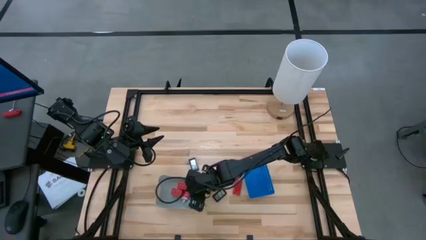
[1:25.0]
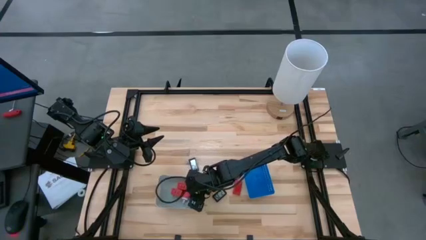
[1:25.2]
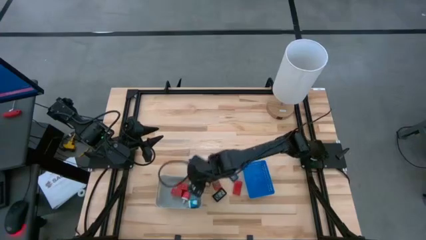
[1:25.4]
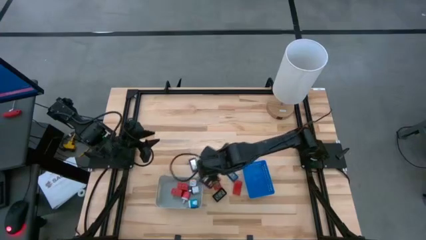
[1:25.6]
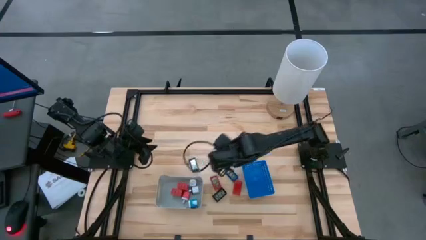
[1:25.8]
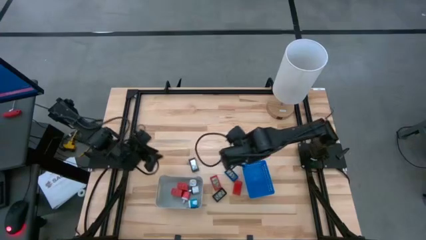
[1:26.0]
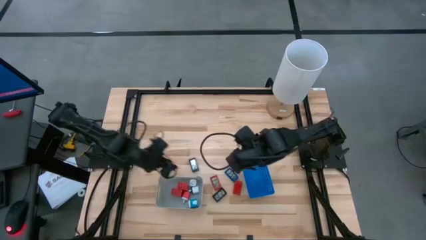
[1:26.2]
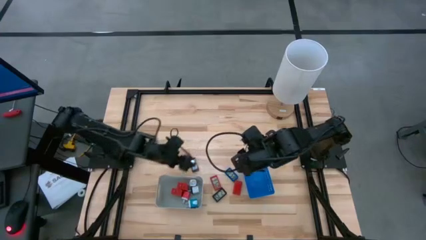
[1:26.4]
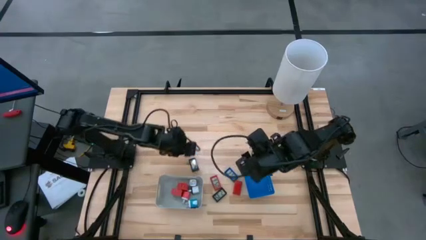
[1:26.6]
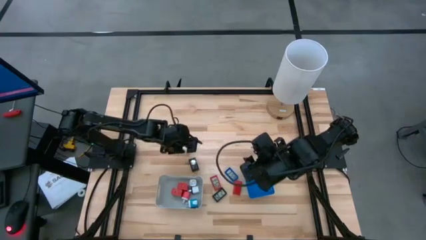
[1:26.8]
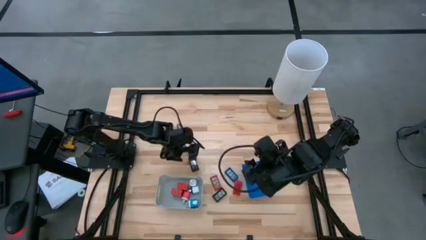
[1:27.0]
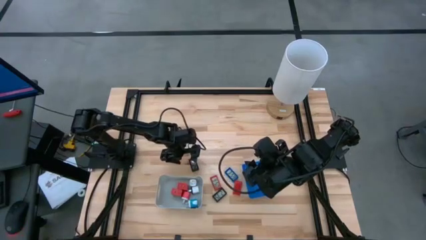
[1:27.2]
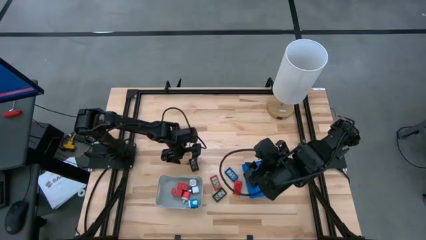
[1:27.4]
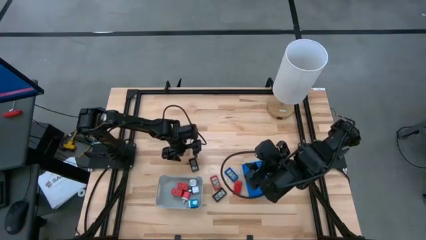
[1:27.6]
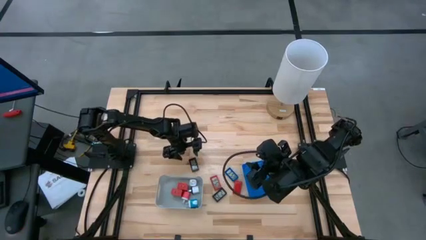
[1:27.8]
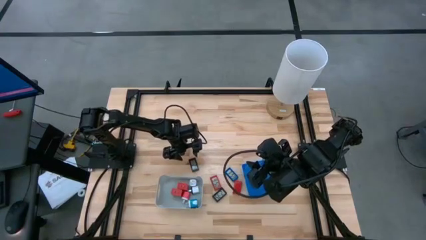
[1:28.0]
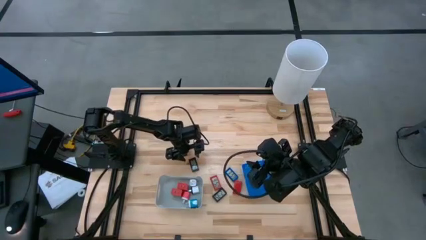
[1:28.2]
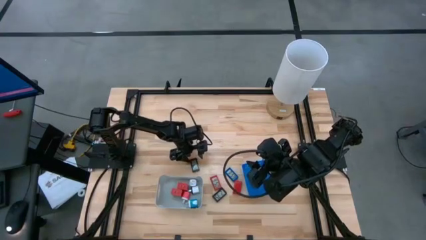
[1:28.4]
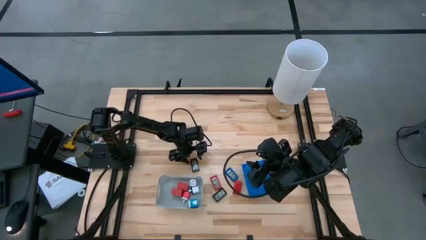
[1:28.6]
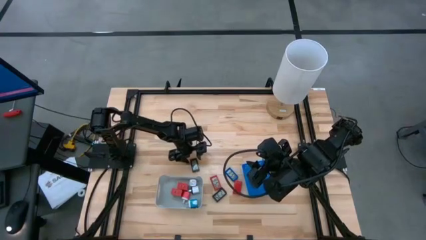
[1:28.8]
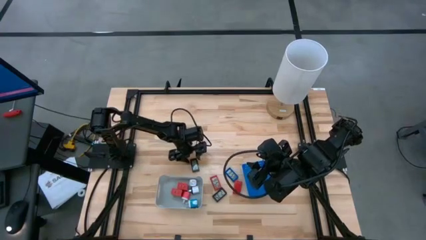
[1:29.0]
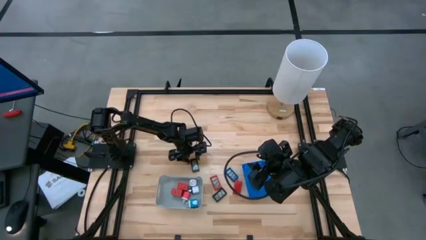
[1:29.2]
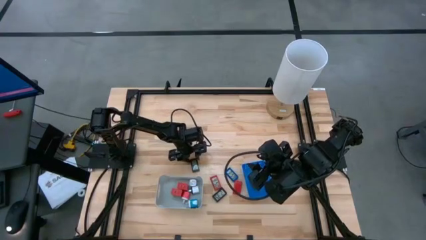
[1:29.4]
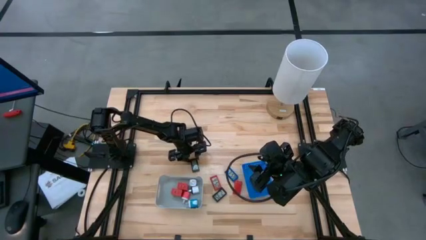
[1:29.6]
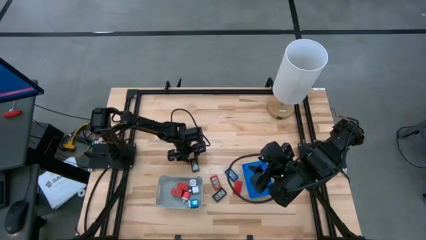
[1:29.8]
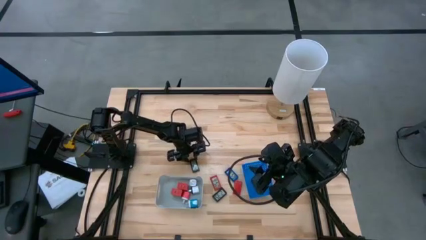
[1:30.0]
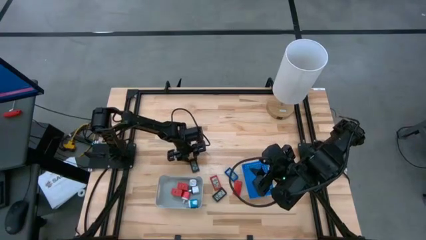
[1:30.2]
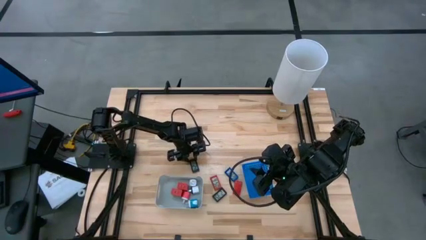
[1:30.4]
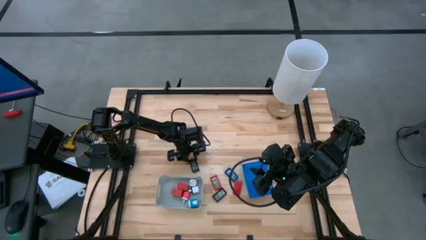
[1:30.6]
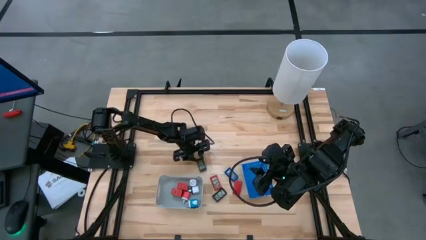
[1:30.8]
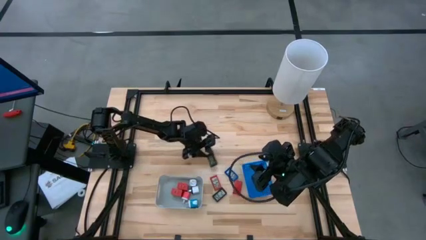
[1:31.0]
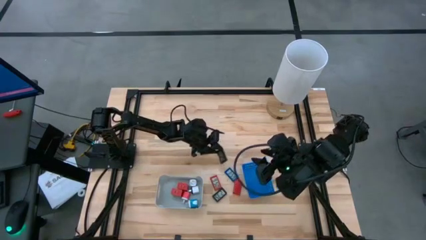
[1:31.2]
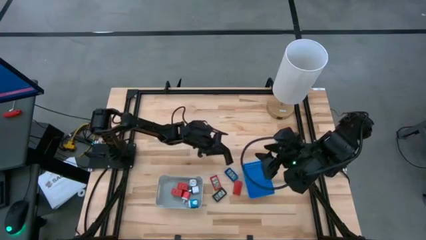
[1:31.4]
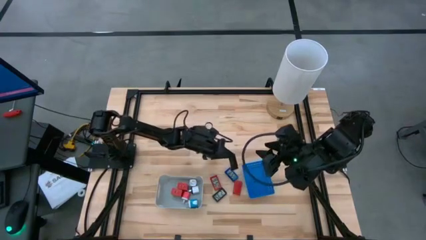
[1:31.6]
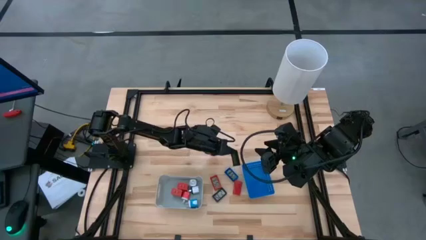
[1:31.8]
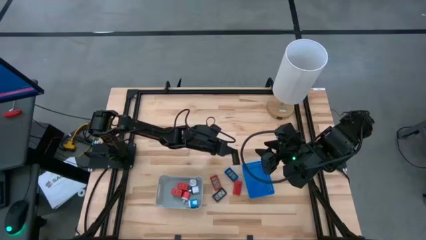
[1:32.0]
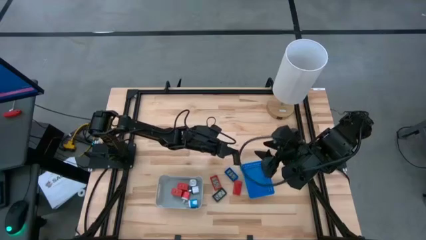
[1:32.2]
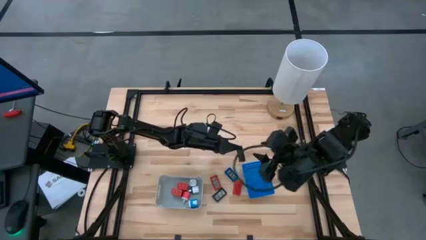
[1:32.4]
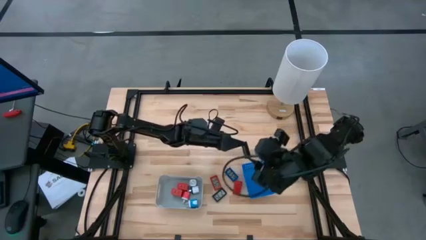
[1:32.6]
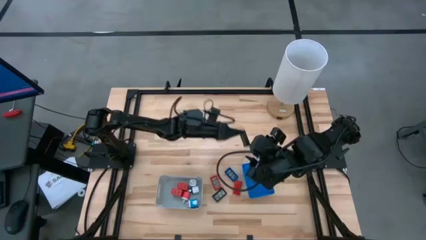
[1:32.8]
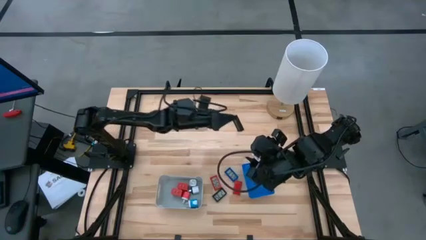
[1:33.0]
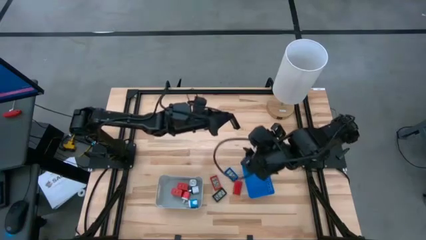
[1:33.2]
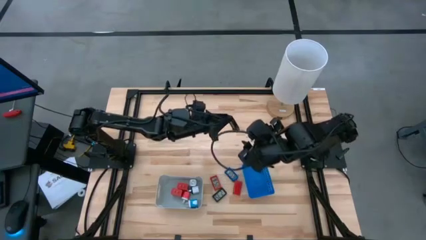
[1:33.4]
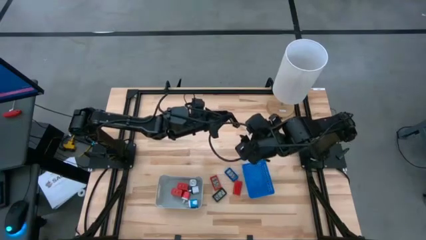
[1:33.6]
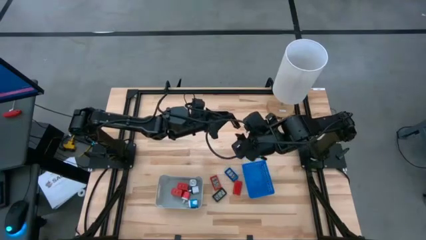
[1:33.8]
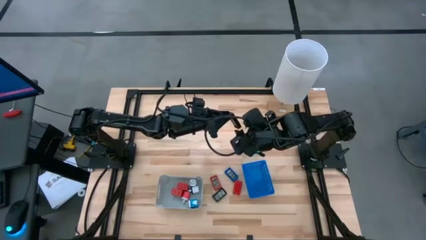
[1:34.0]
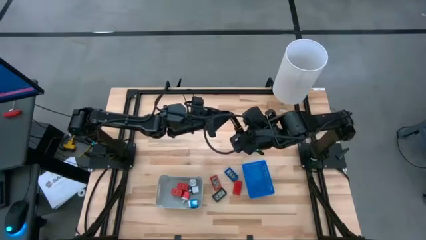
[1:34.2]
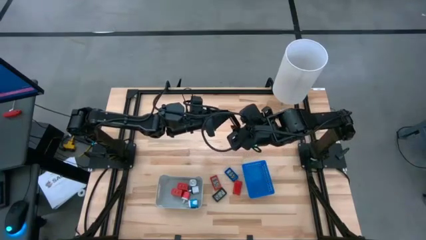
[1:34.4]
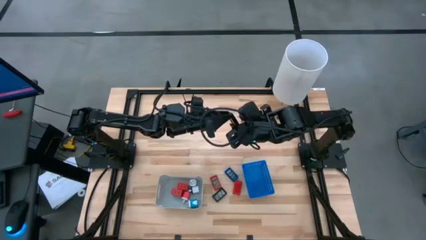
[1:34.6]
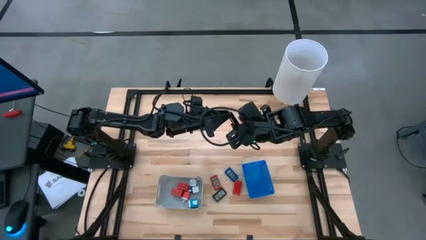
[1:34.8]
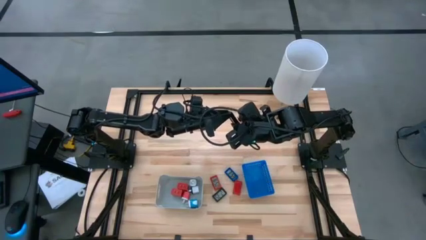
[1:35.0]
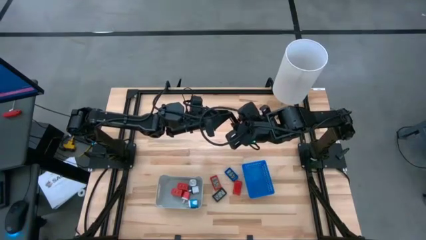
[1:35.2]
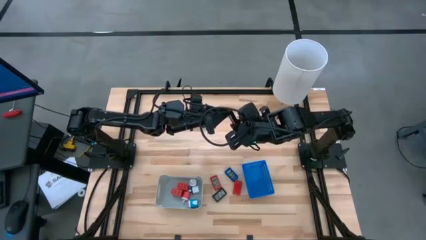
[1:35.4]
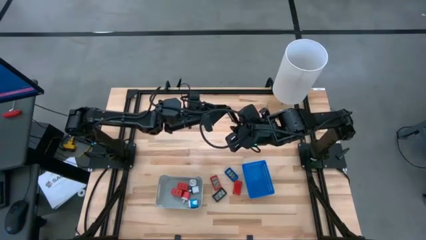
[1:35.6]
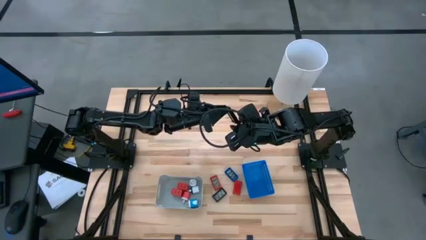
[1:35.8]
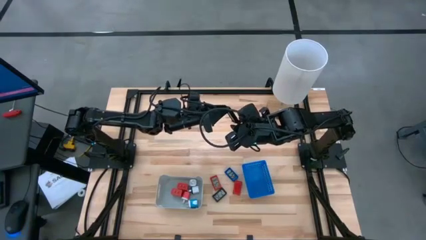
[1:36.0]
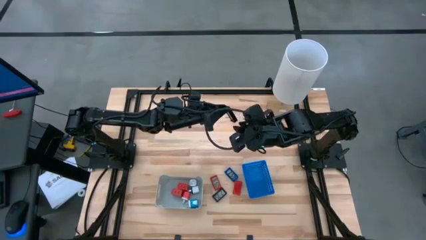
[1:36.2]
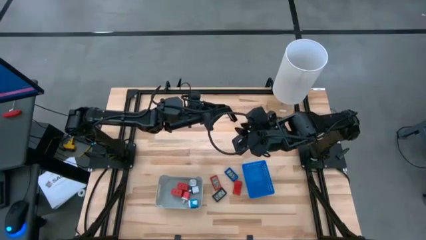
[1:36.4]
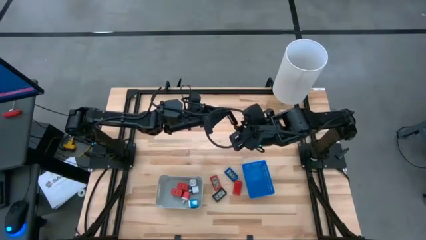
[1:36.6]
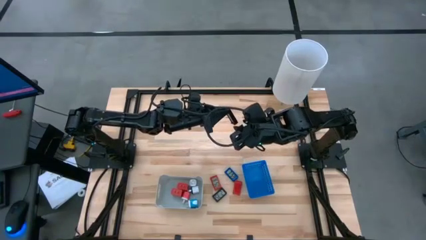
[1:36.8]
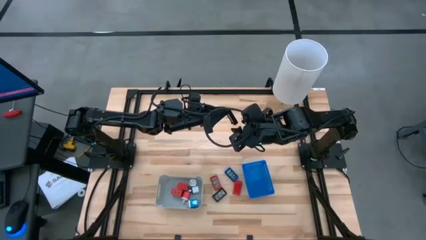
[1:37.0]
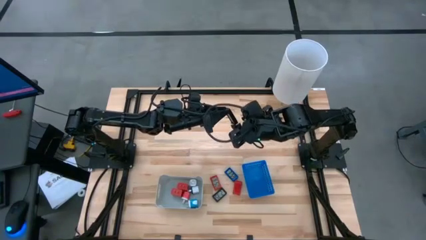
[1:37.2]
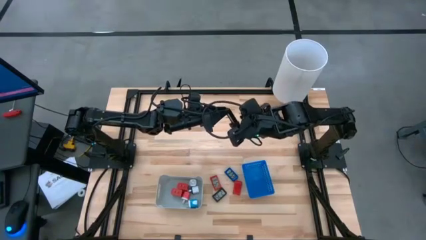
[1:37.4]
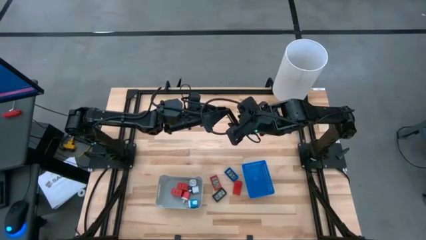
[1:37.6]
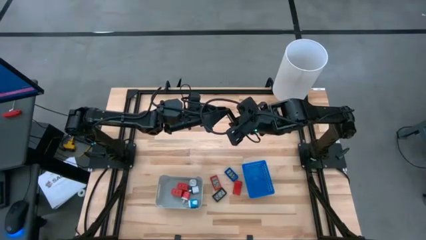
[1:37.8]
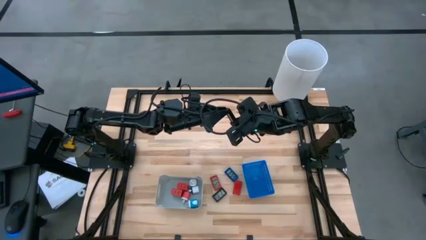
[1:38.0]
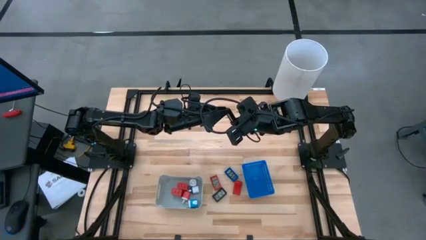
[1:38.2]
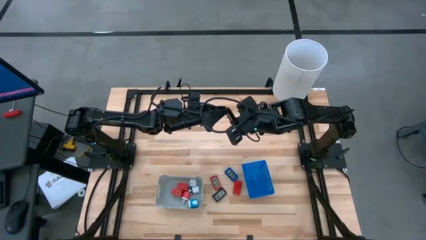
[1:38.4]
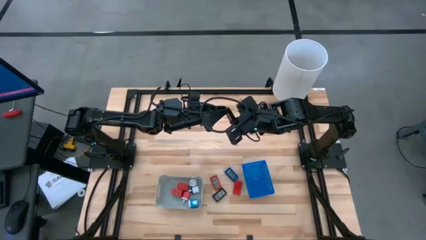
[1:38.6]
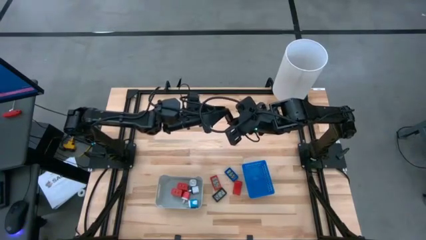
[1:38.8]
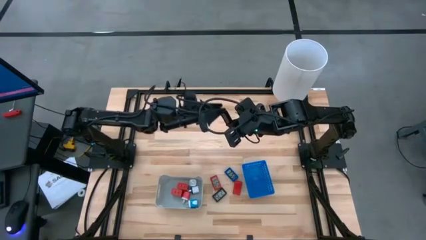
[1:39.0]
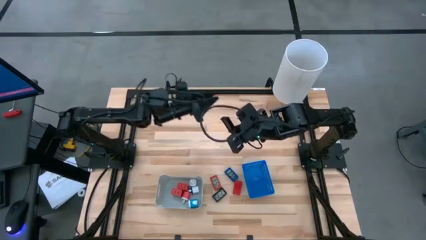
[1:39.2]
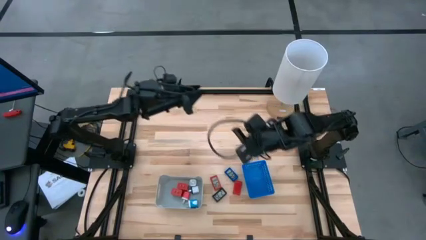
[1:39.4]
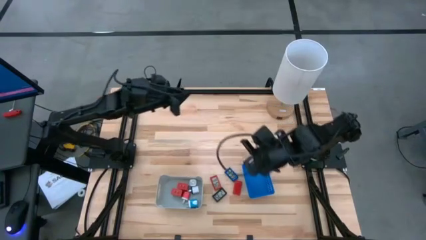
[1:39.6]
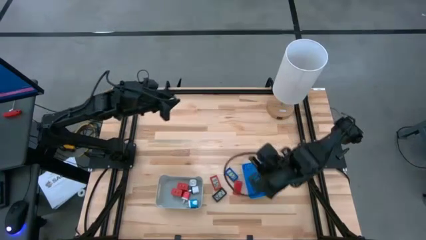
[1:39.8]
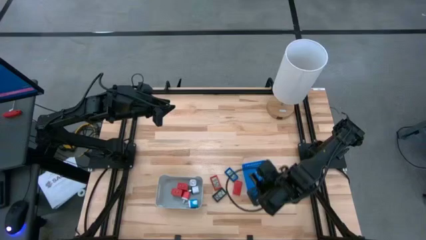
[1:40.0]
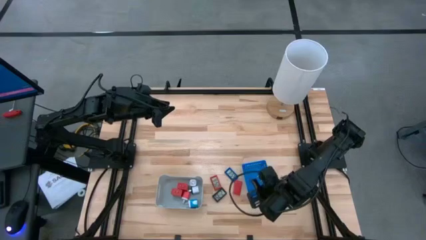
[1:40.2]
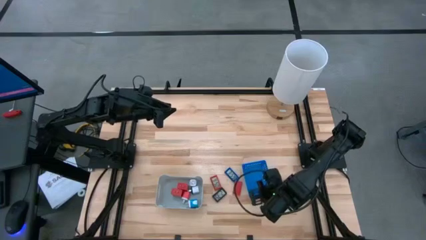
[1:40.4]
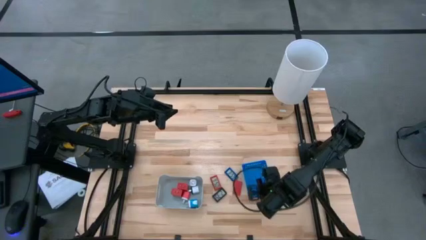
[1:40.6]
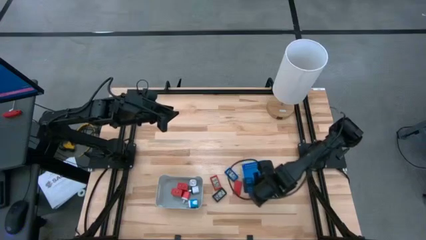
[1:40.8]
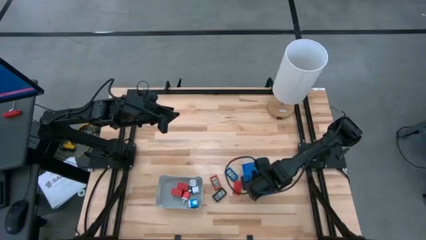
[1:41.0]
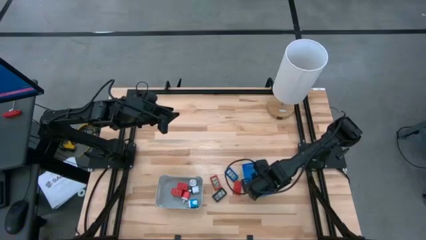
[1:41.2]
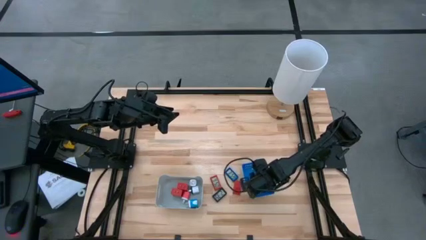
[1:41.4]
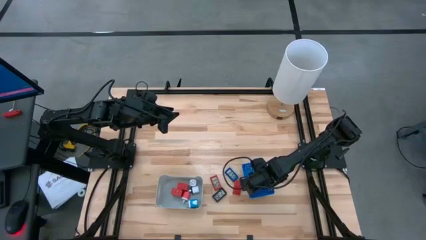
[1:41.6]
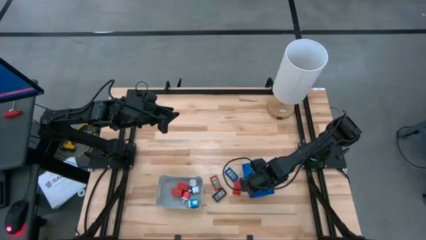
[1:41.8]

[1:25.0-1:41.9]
Task: Pick & Place Office items
Put the top black digital timer into the blue bin
